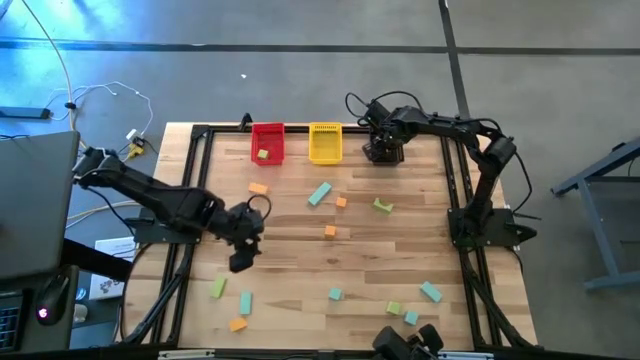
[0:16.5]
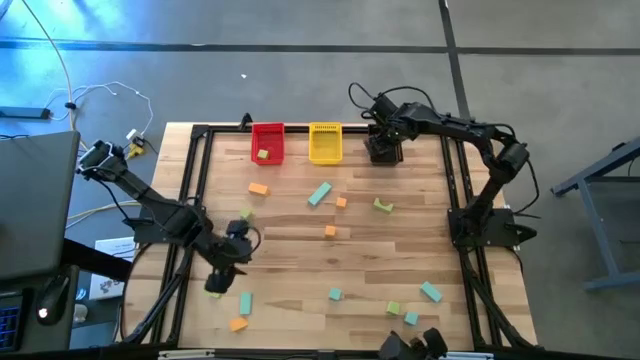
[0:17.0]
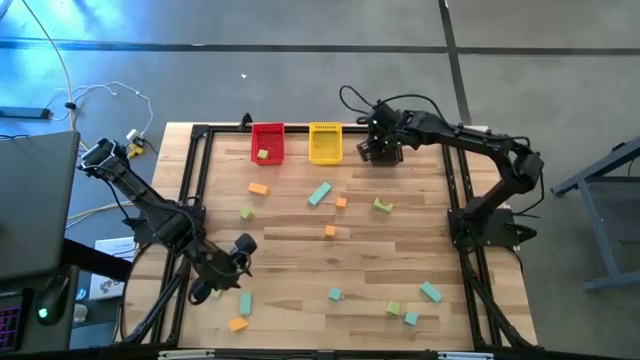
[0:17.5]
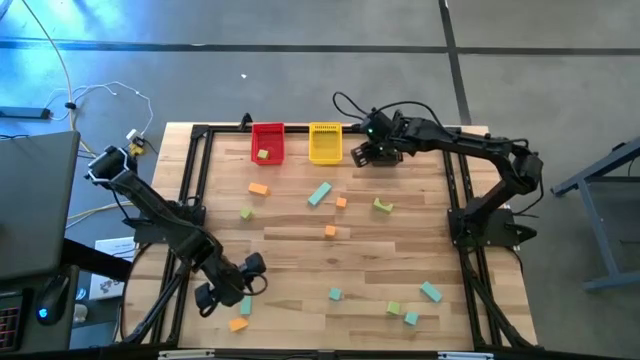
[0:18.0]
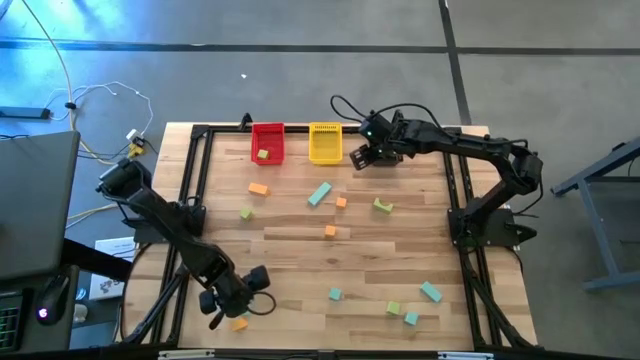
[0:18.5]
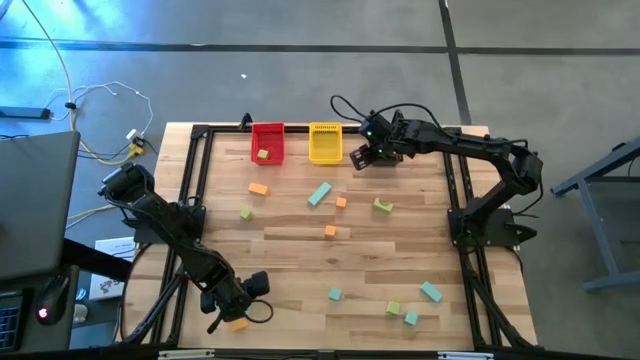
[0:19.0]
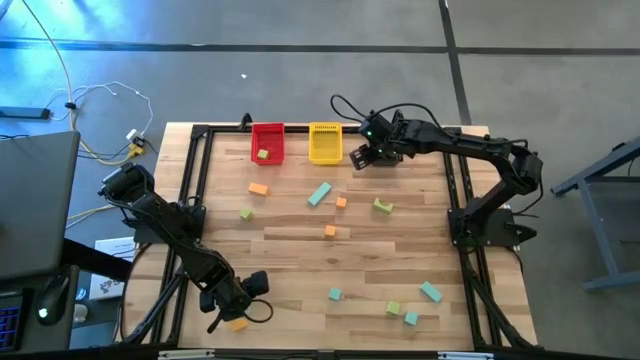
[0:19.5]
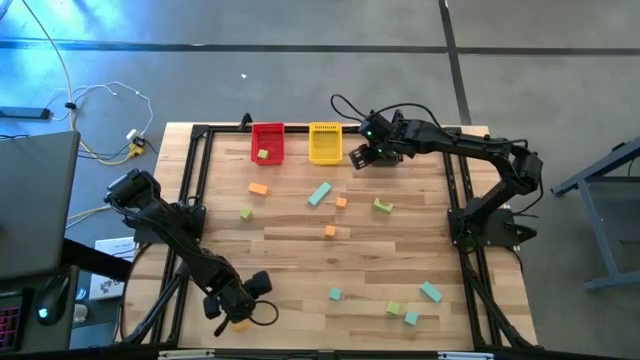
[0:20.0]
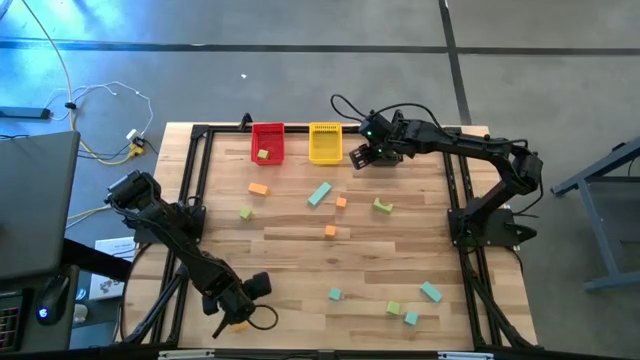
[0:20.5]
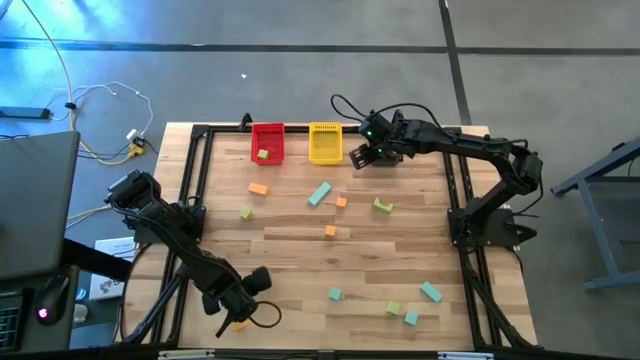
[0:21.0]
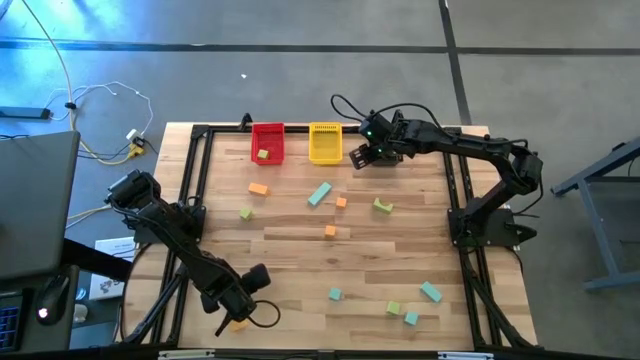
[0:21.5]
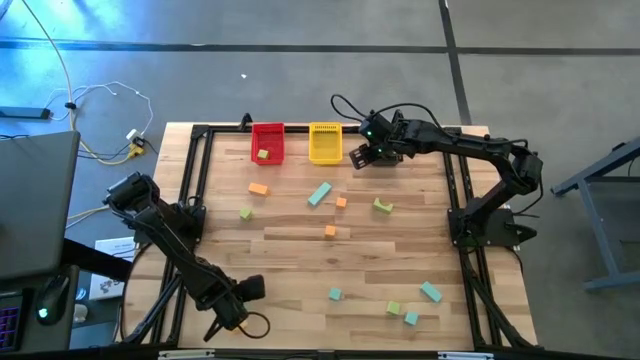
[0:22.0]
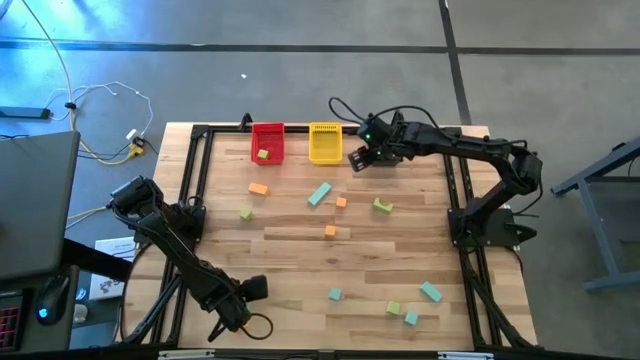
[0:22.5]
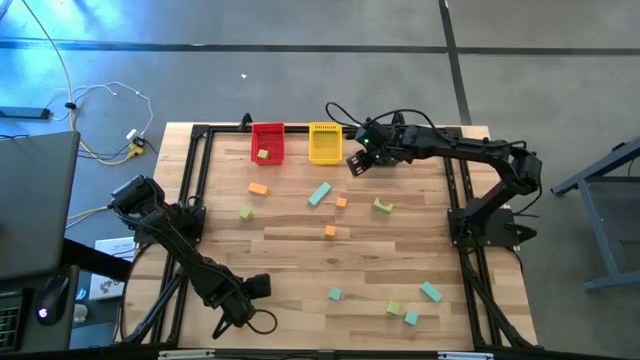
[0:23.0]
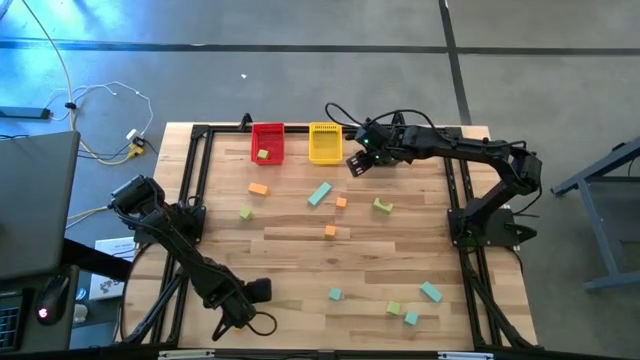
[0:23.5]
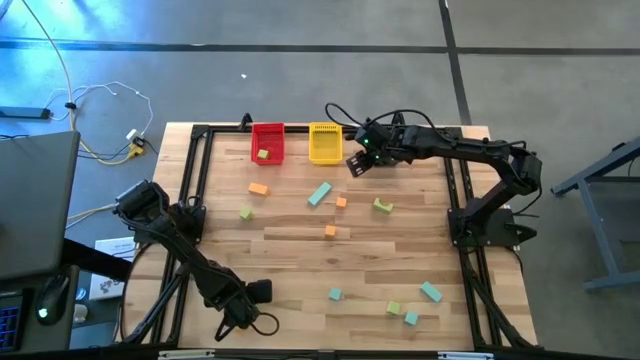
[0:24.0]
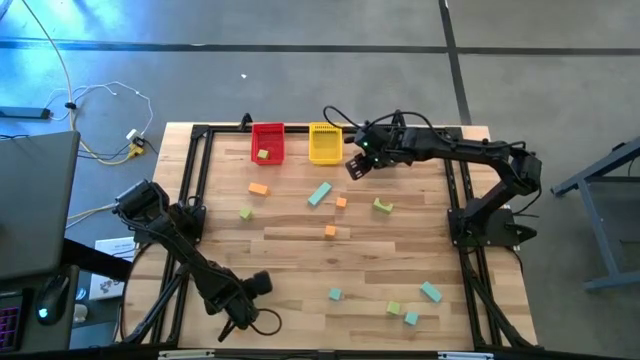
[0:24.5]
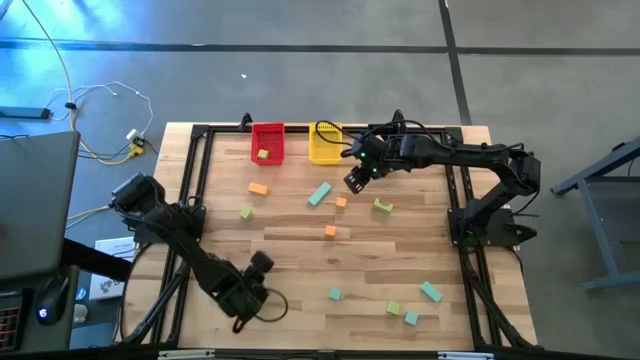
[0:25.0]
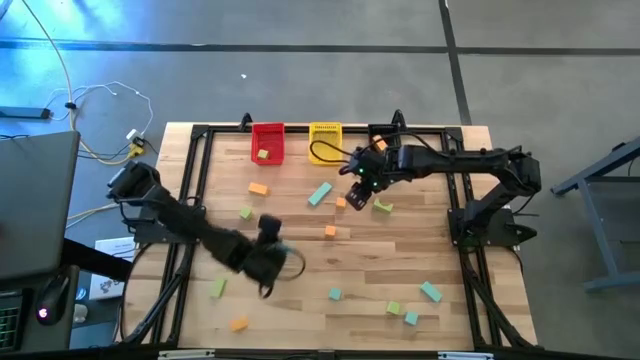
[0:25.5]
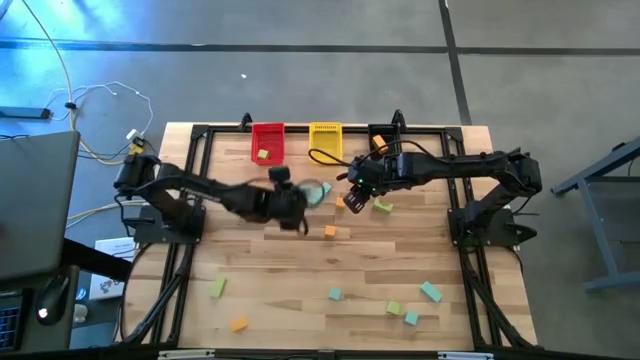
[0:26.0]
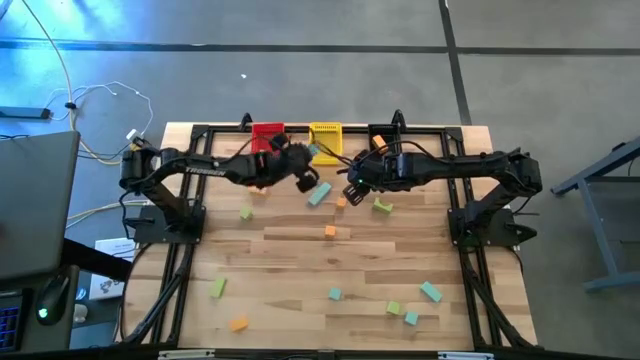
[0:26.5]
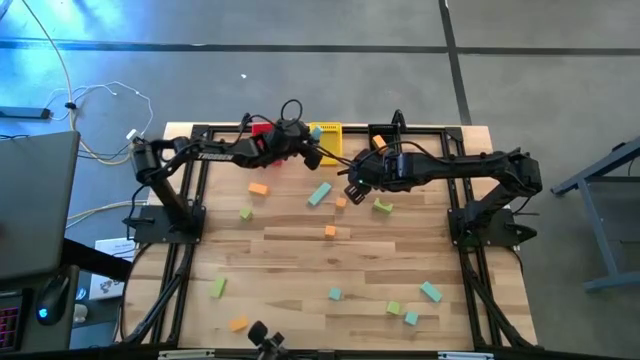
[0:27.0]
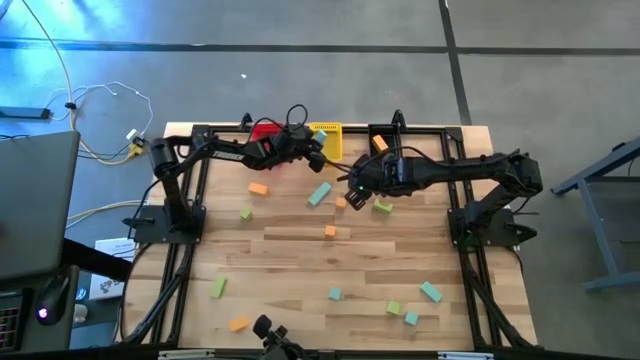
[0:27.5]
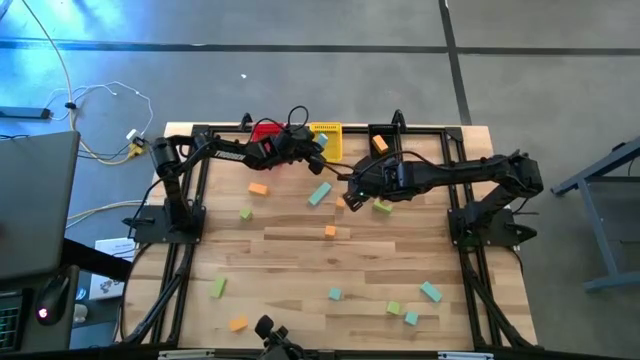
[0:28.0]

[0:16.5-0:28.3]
Task: Sort & place blocks by color
Put the blue block into the yellow basket

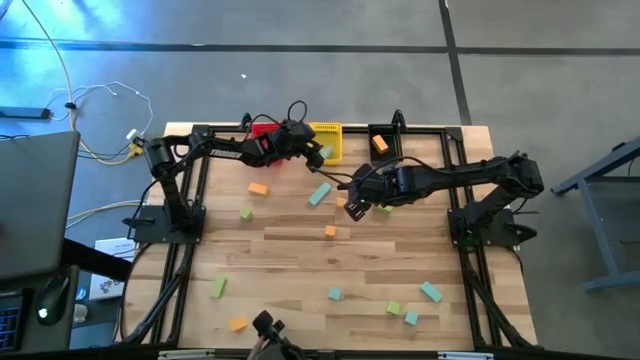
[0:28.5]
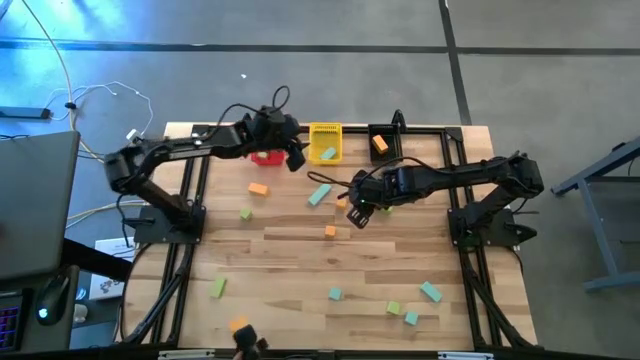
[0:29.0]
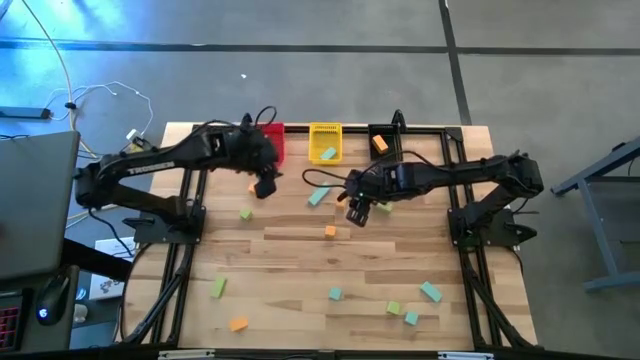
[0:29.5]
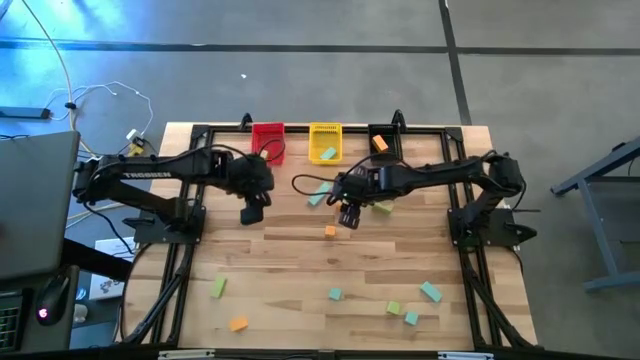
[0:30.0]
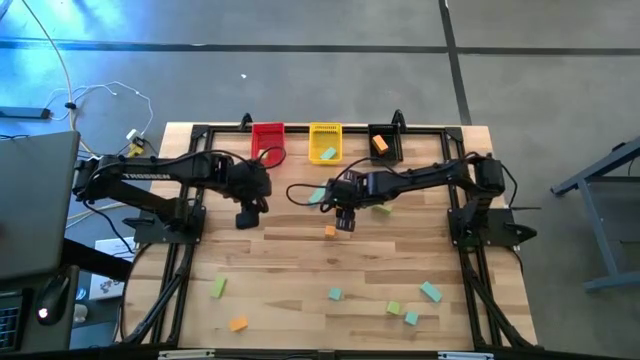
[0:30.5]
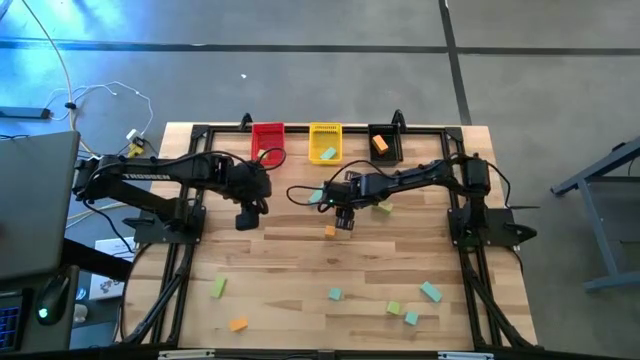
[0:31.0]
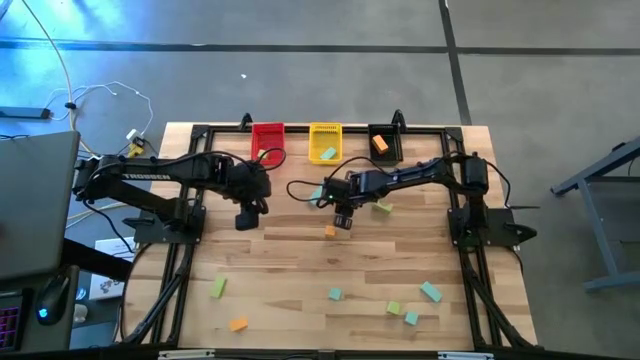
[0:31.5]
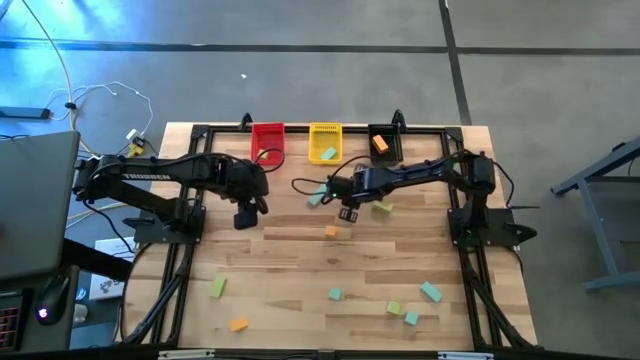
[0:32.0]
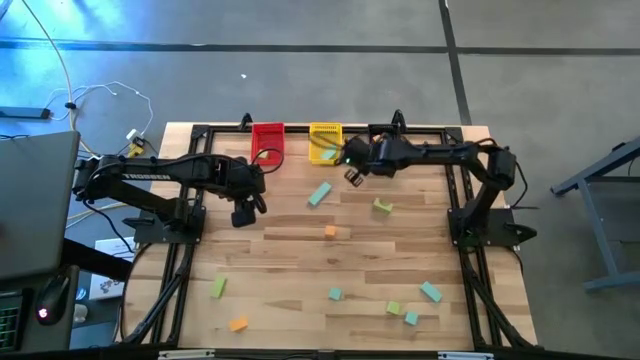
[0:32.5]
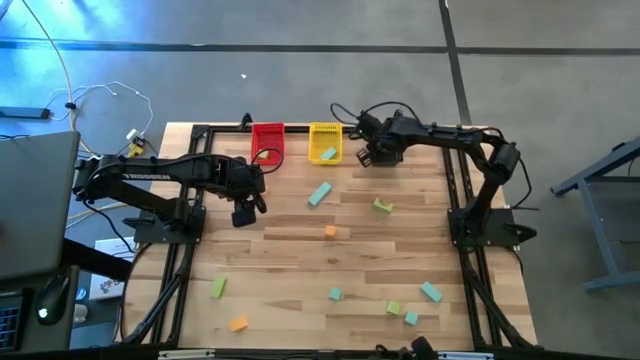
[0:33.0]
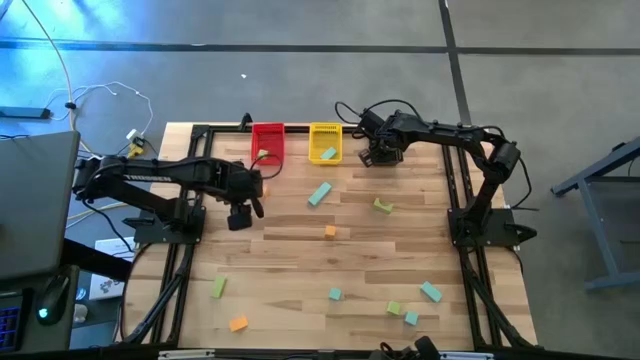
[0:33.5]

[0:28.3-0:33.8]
Put the orange block into the black basket

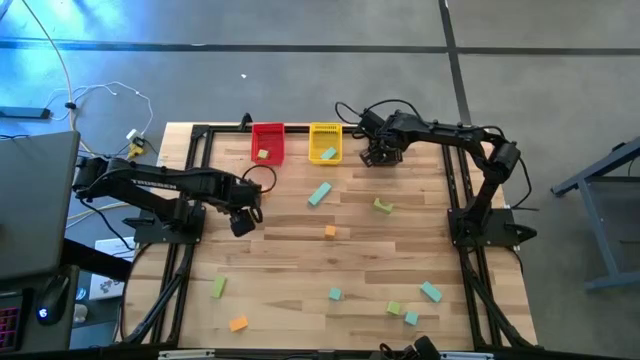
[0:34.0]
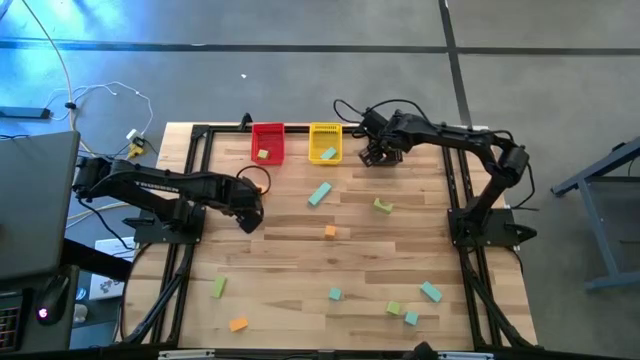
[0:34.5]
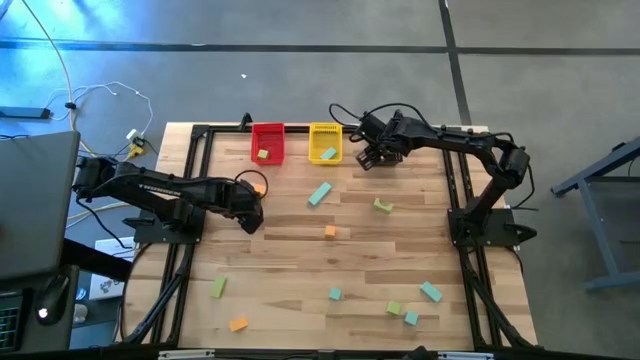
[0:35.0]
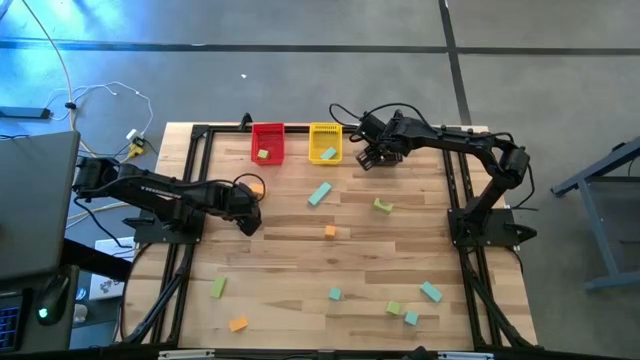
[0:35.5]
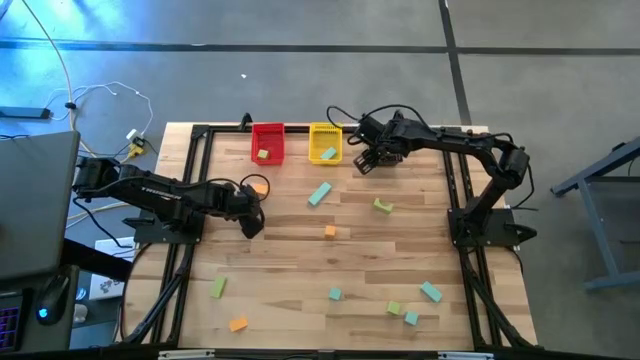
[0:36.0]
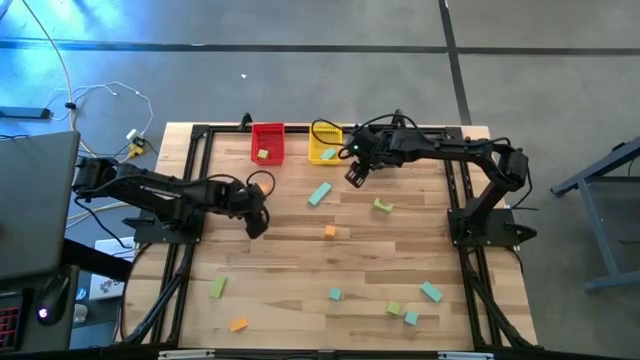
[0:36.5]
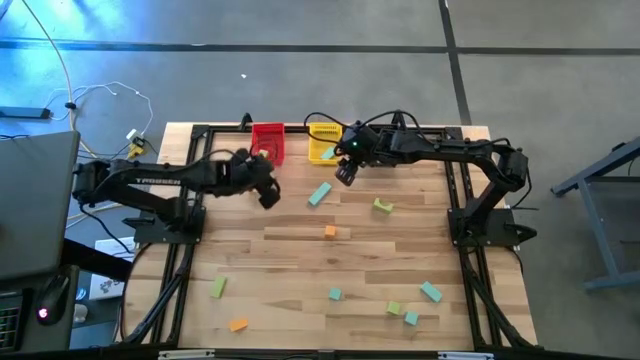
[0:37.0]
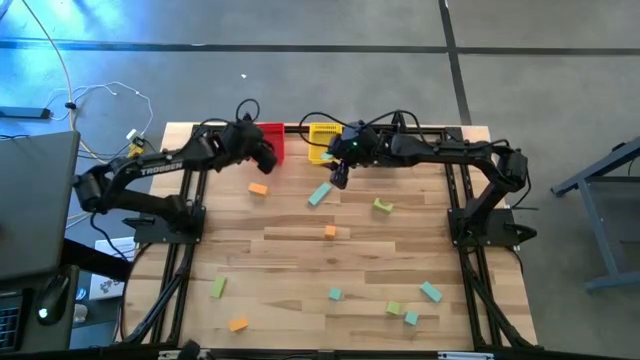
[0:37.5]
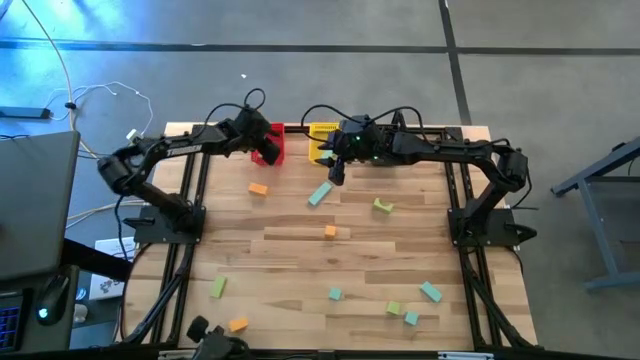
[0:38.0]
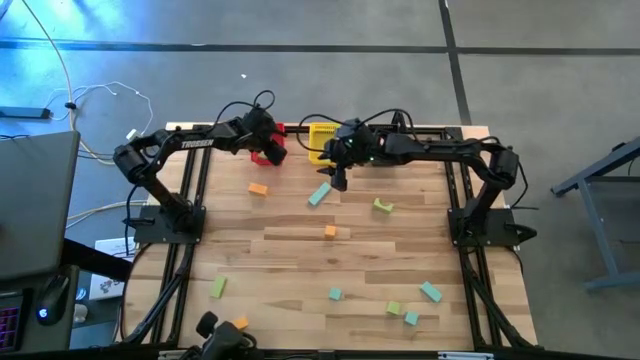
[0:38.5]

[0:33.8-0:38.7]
Put the green block into the red basket
